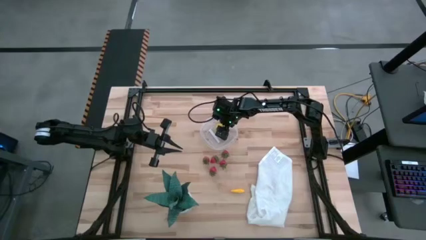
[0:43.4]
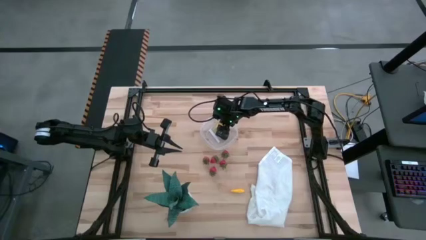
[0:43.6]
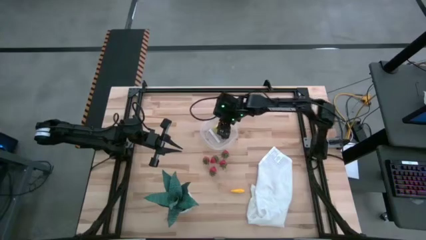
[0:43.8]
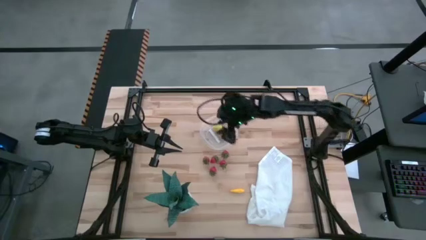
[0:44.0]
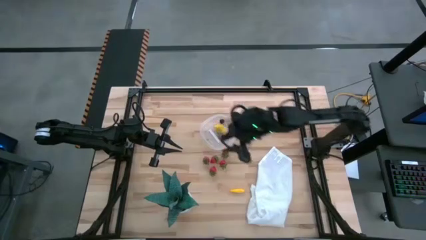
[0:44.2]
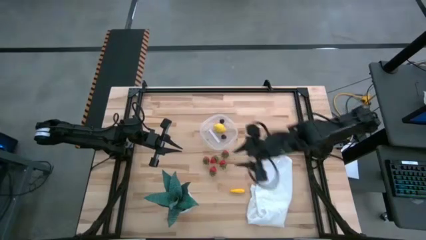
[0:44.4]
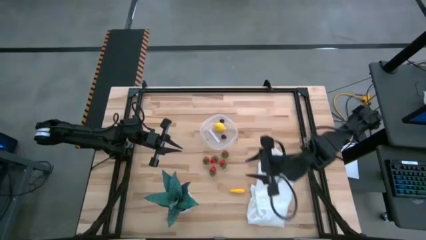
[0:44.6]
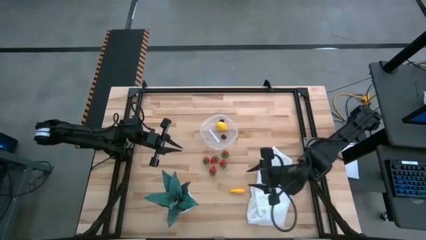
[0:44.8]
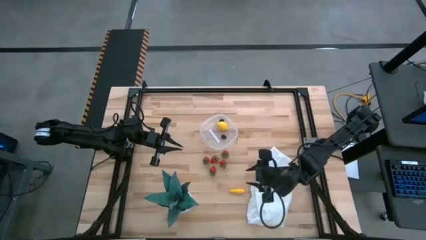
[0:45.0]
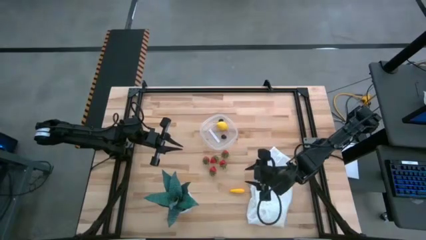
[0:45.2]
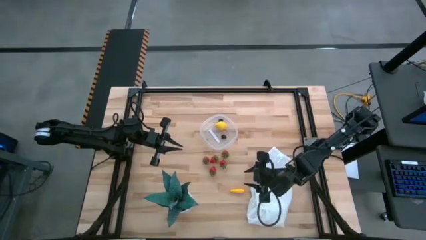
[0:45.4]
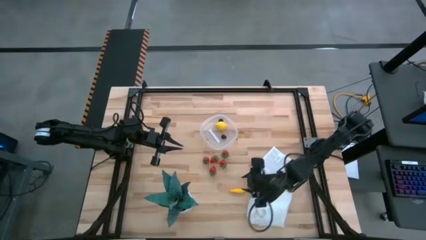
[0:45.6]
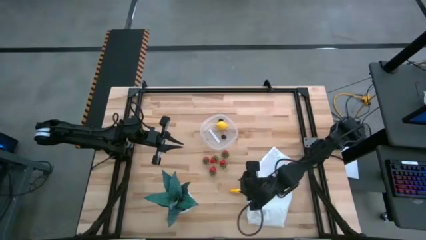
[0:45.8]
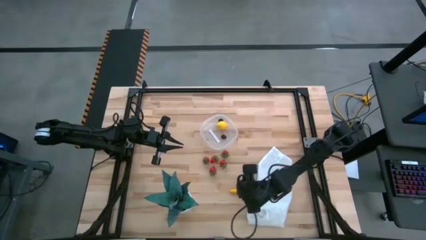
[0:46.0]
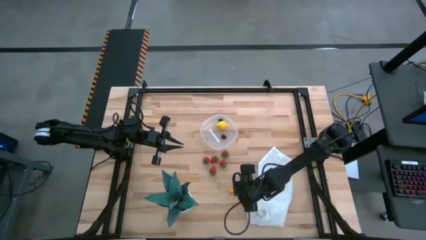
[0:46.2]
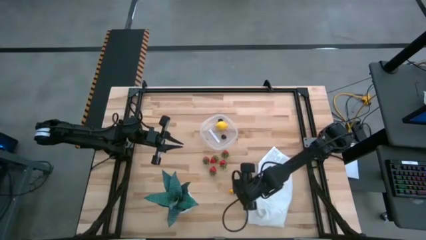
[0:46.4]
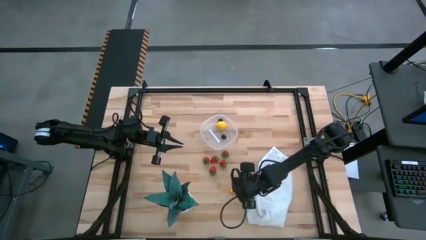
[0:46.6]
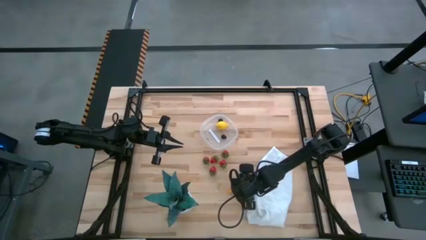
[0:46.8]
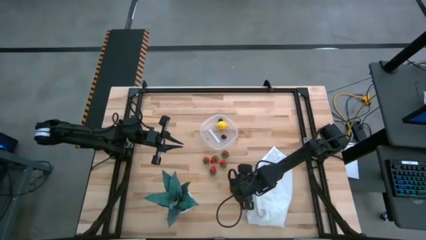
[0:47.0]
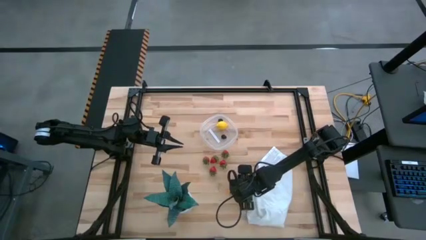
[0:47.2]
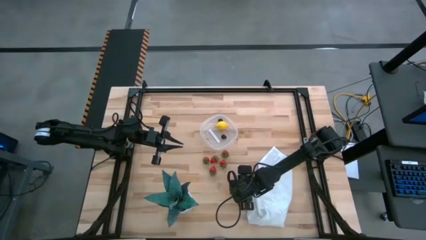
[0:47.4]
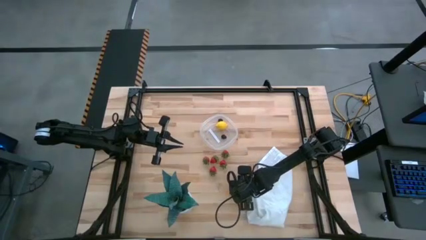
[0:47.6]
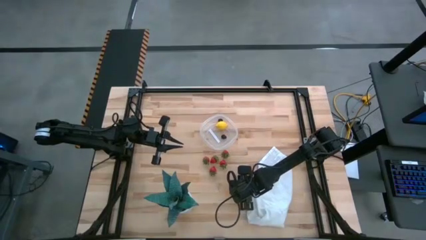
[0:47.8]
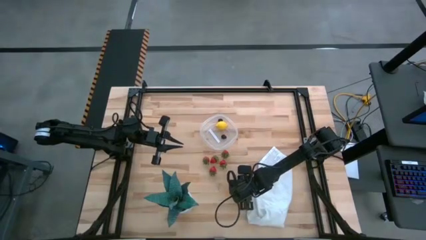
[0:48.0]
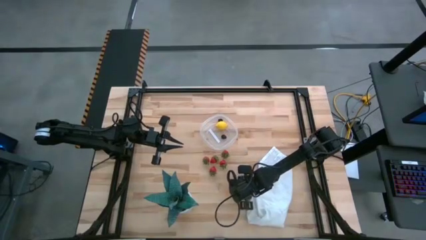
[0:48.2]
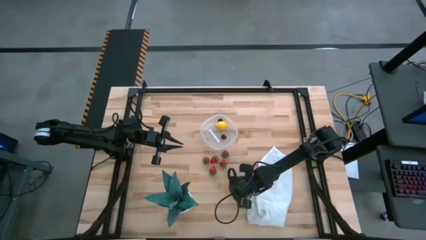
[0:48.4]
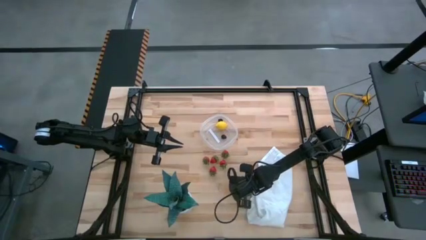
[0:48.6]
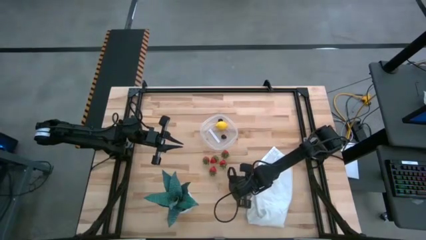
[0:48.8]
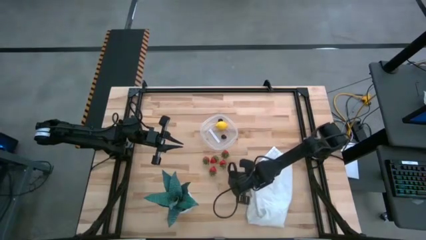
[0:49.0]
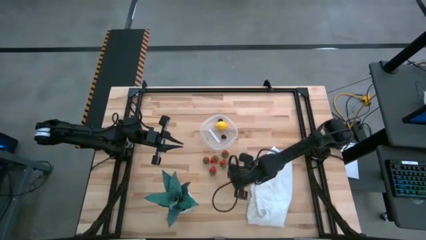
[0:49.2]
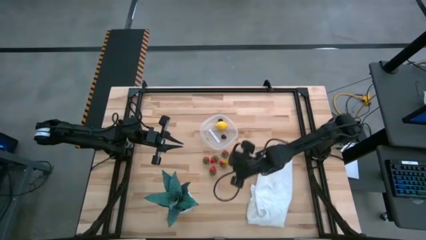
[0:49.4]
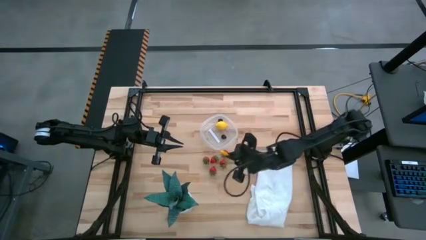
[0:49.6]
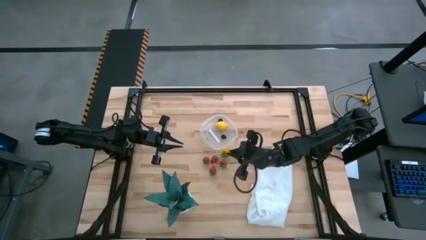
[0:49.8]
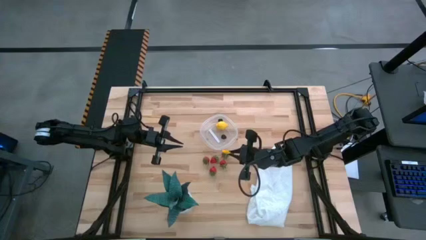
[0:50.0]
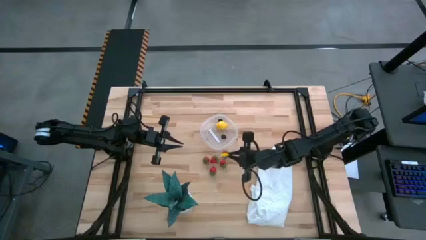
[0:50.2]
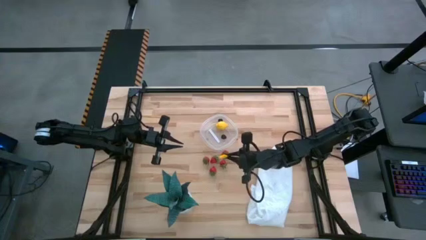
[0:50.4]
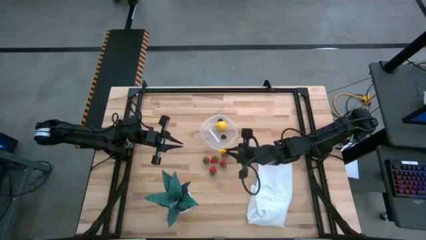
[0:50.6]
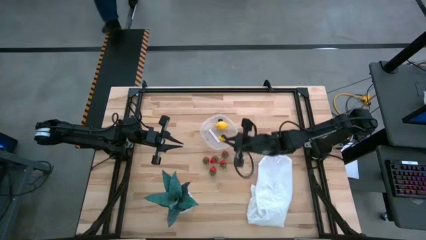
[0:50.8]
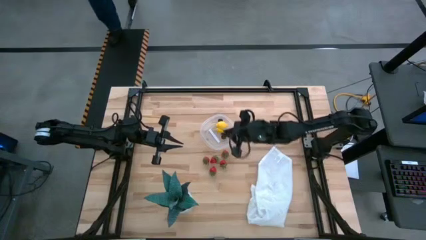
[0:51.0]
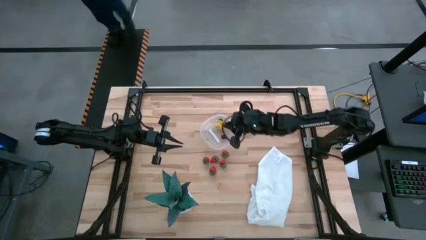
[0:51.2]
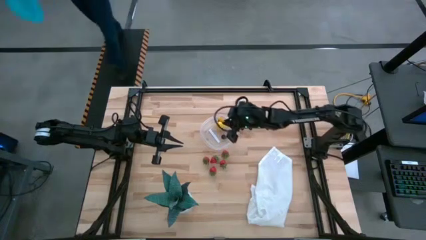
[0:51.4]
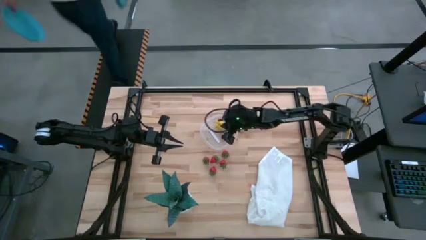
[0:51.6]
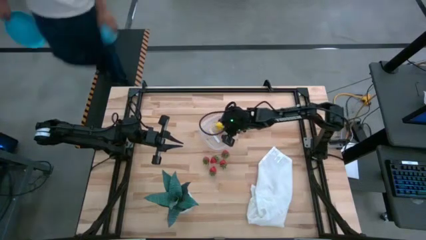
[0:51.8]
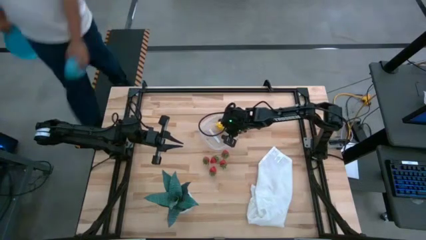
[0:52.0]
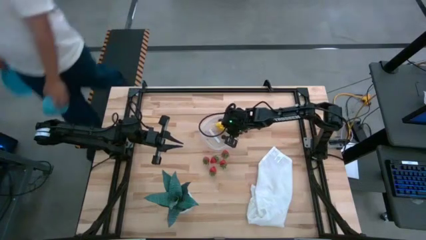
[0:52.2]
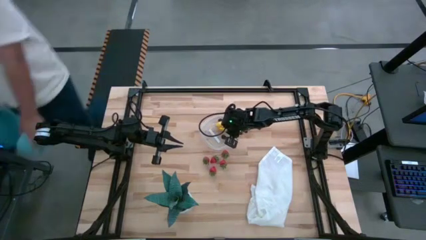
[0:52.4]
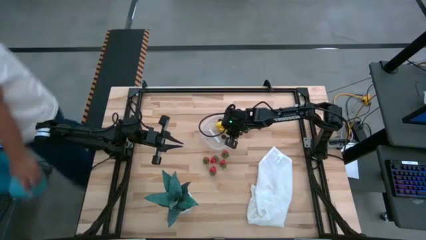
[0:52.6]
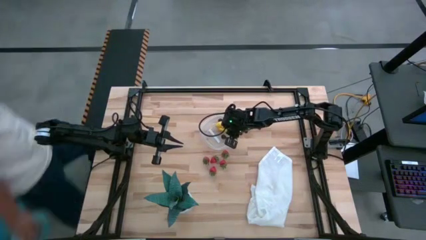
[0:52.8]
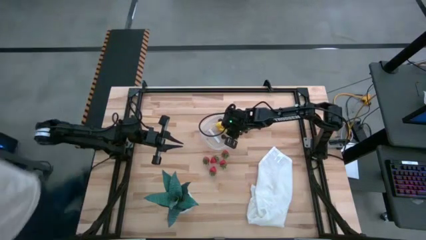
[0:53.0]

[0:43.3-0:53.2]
Task: Pick and placing Produce into tupperware
Put the corn into the bin

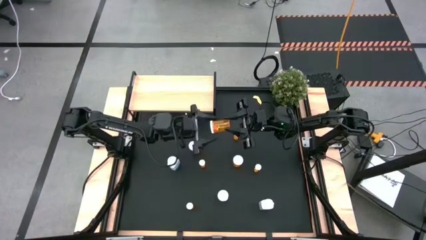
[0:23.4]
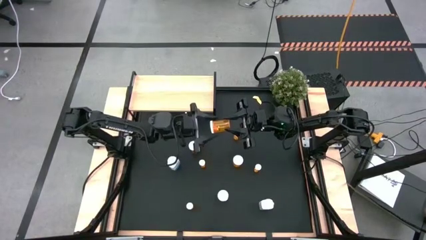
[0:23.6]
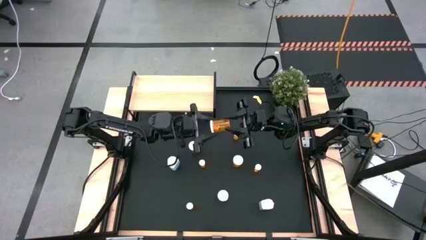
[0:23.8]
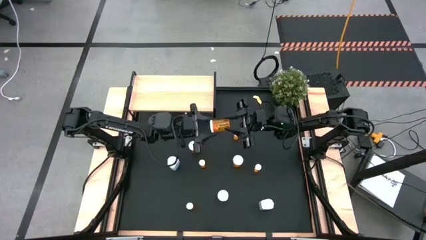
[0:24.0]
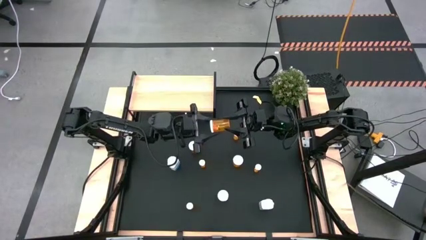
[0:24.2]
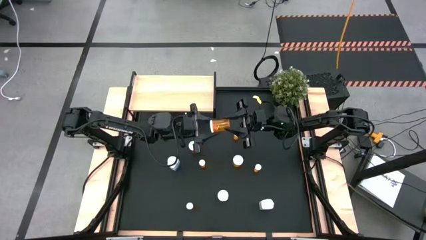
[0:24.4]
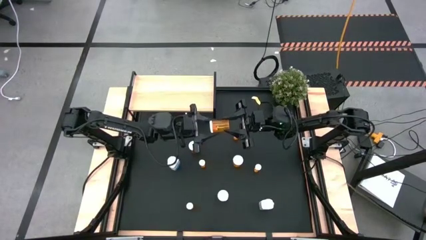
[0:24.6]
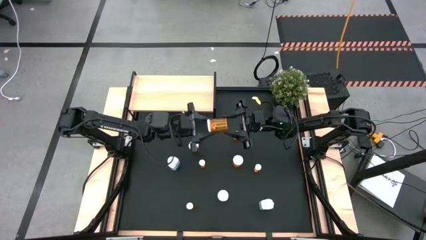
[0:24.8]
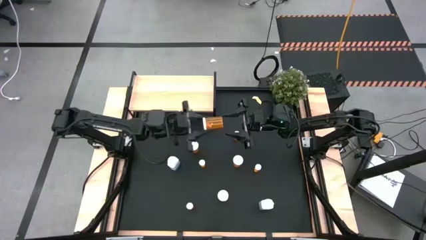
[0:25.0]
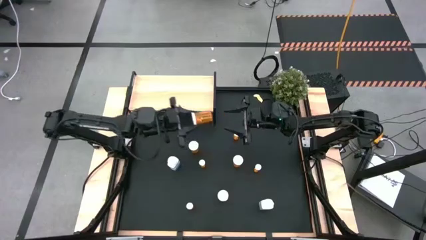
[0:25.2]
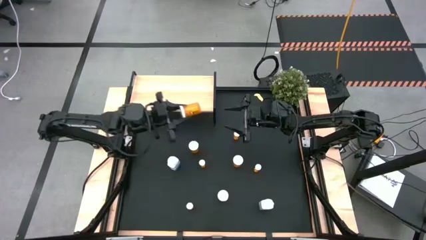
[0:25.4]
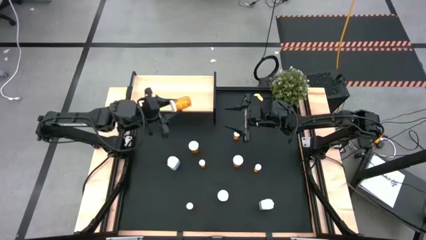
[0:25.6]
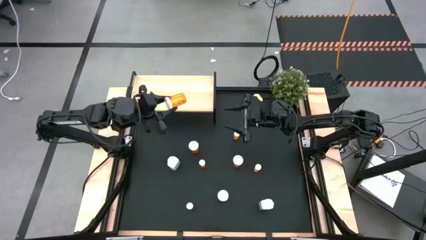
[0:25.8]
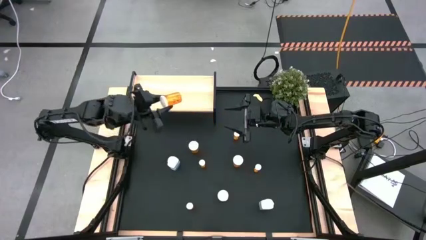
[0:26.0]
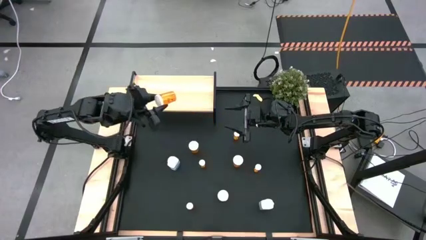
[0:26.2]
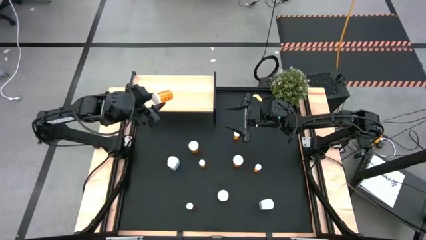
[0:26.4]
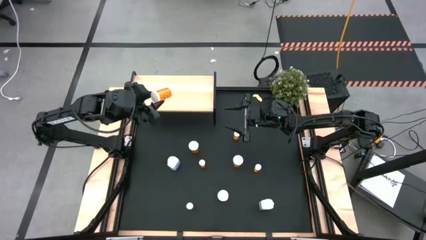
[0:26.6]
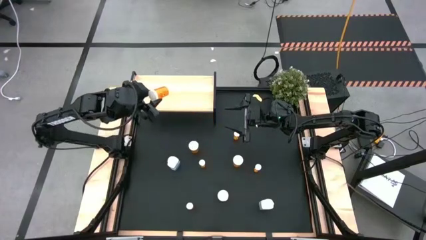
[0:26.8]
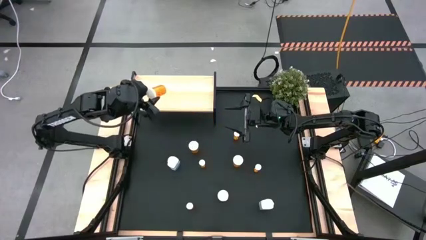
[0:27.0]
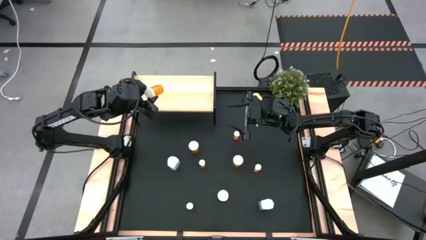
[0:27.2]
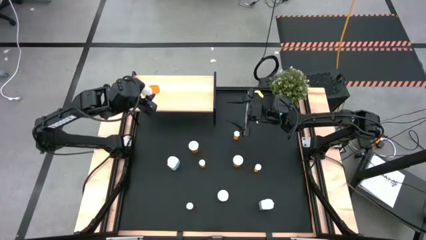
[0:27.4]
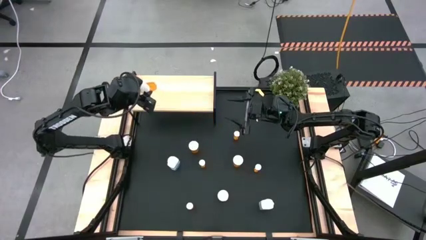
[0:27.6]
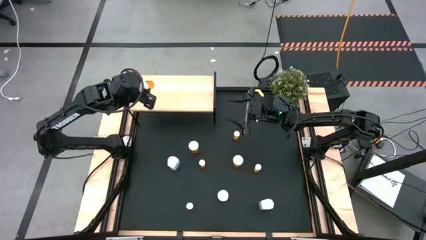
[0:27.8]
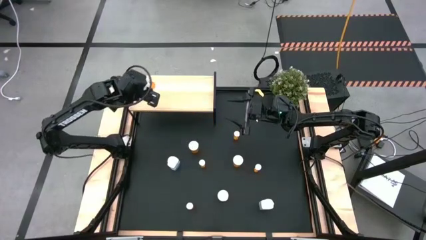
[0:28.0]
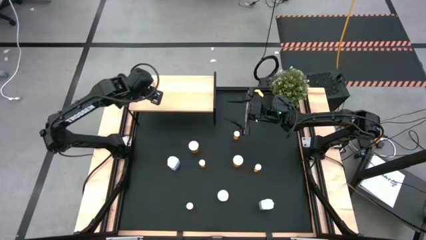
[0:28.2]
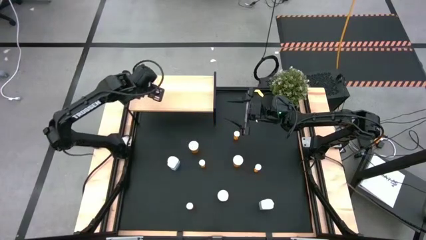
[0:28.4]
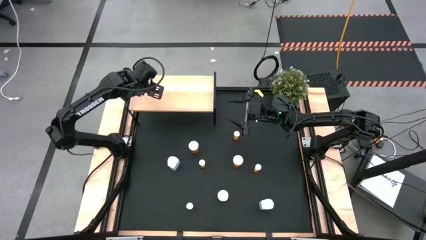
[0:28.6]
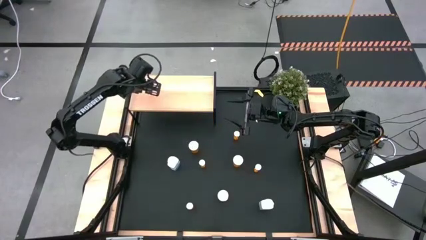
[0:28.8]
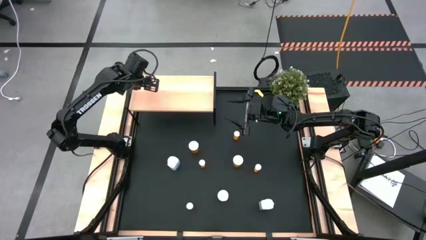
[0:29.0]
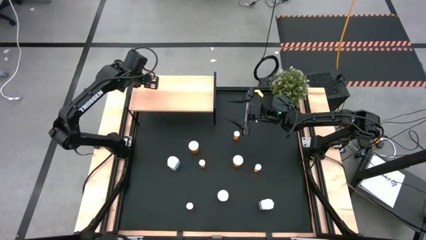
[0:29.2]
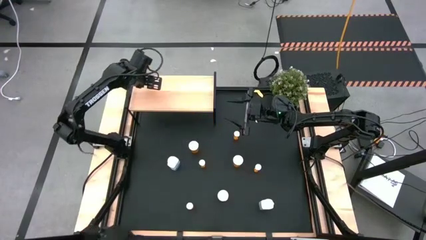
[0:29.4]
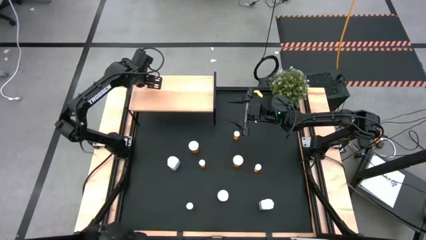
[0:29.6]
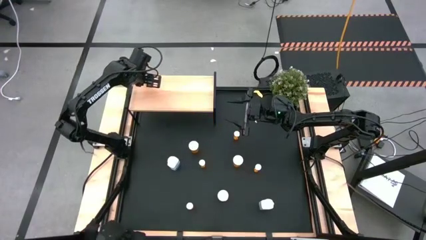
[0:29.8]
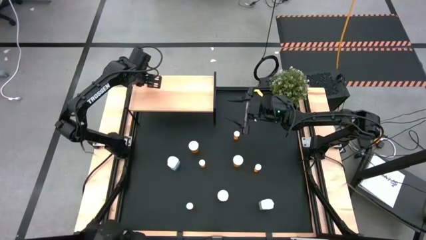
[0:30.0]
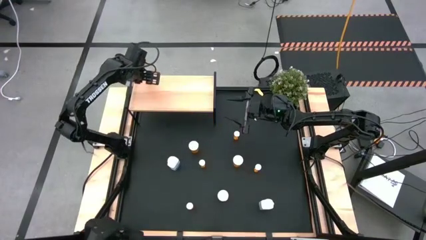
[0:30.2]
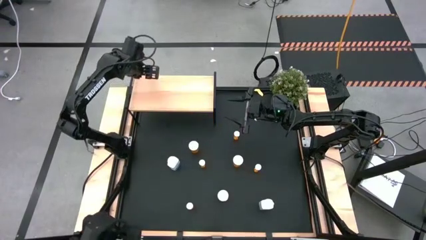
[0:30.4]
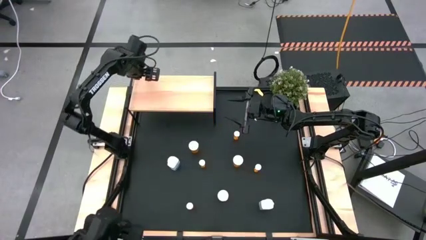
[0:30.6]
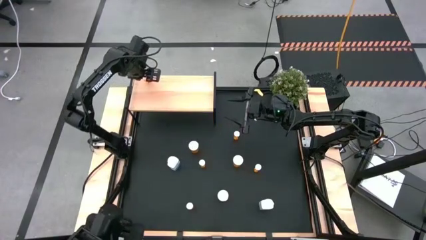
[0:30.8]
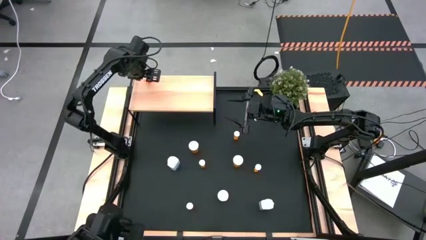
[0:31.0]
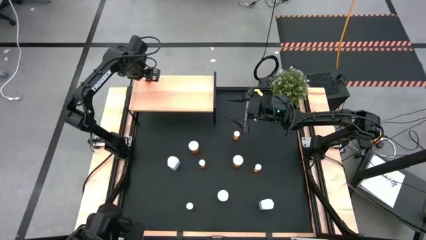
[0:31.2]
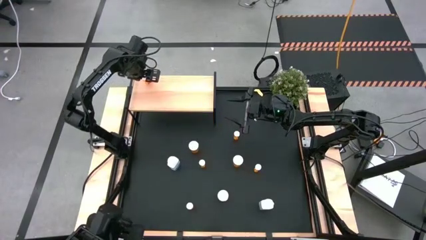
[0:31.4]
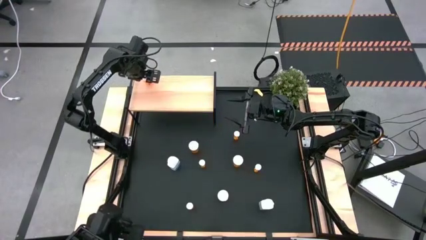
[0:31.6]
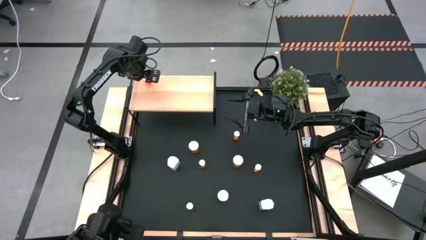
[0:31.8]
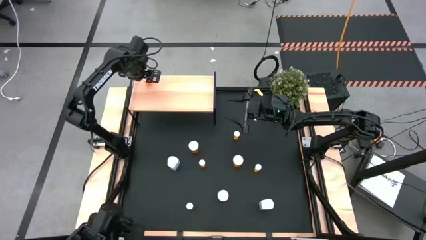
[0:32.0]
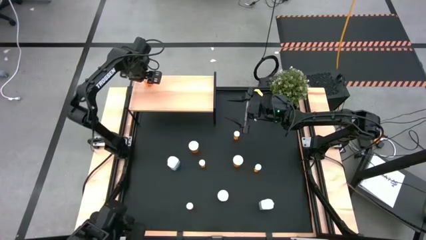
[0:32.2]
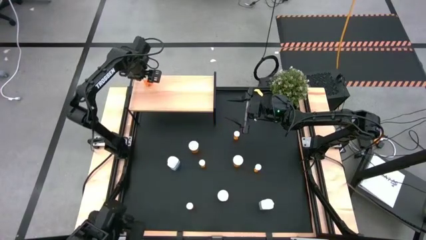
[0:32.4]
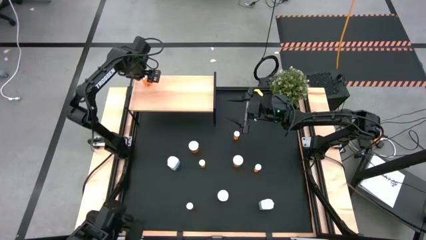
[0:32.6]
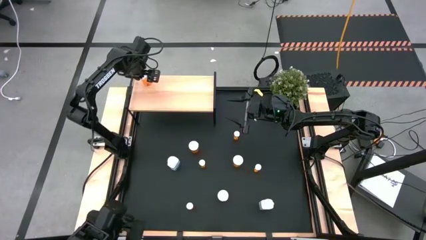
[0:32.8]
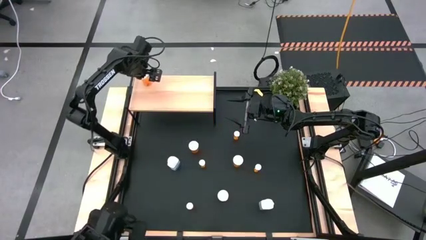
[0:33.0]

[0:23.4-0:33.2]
Task: Pick and place medicine bottles onto shelf by color
Put the large orange pill bottle on the shelf
